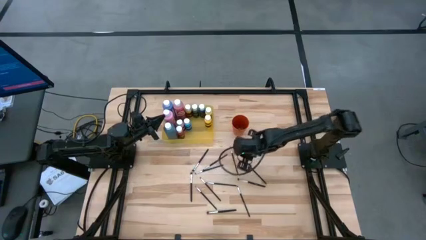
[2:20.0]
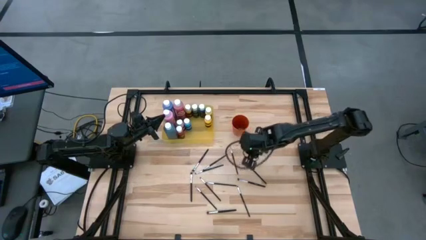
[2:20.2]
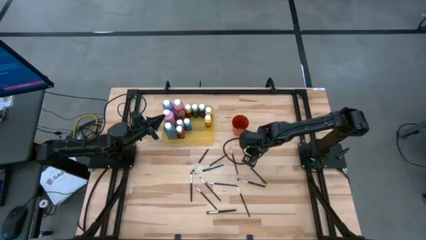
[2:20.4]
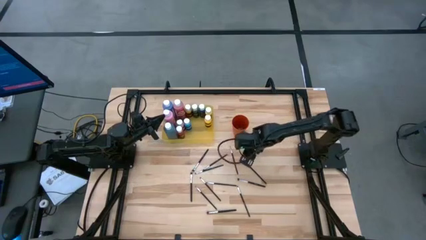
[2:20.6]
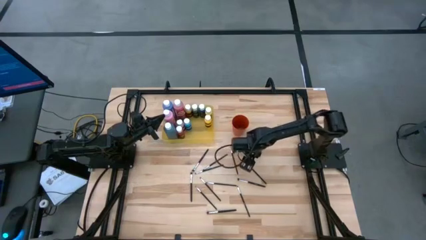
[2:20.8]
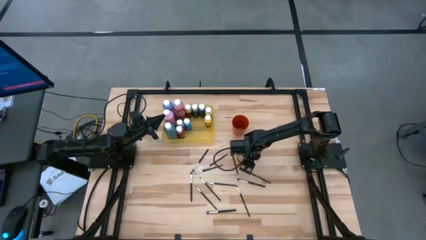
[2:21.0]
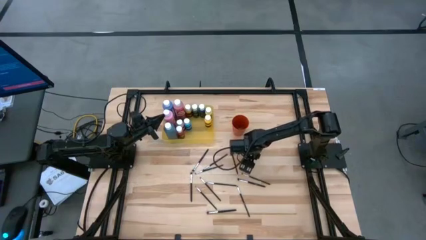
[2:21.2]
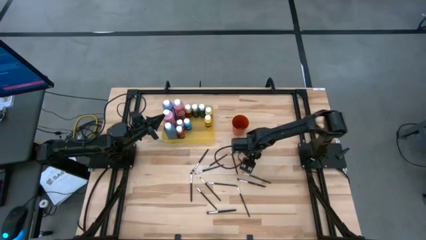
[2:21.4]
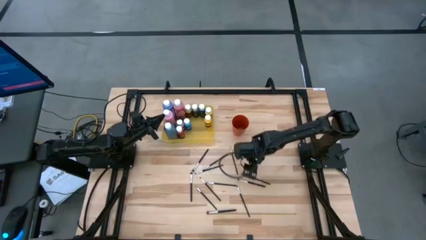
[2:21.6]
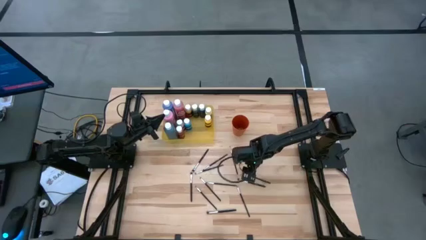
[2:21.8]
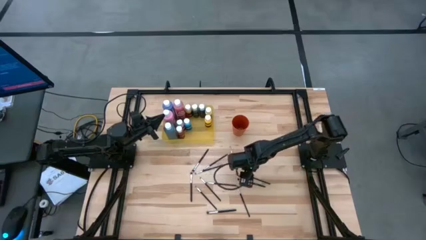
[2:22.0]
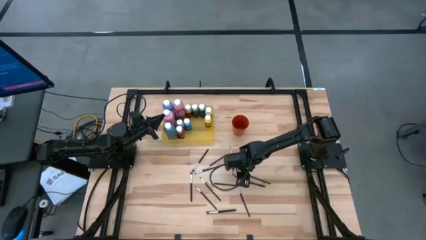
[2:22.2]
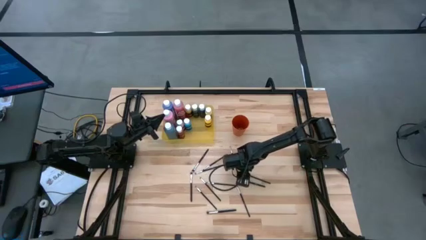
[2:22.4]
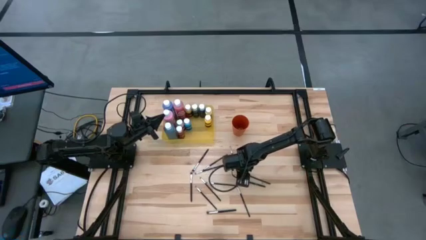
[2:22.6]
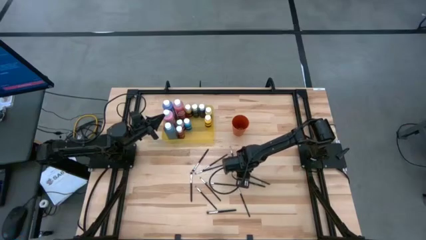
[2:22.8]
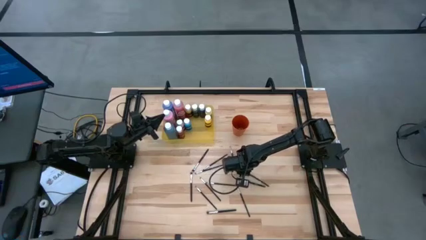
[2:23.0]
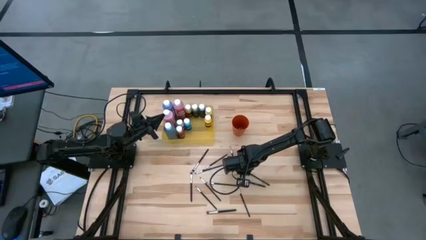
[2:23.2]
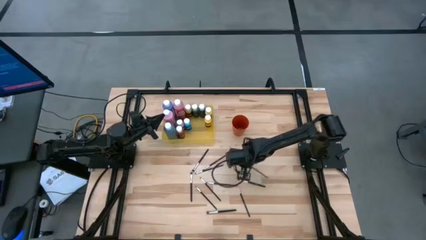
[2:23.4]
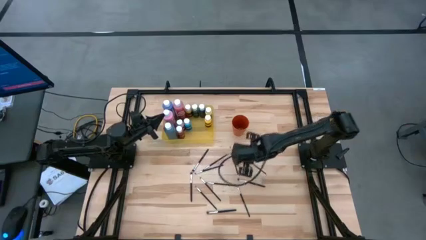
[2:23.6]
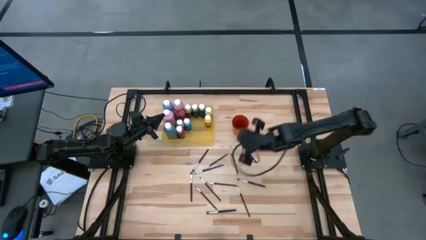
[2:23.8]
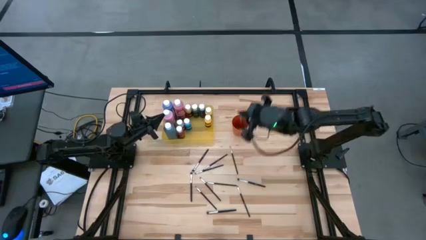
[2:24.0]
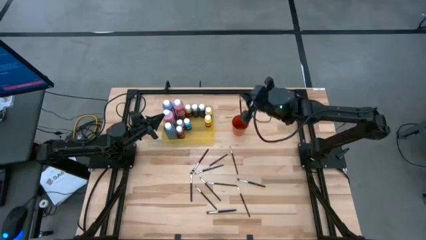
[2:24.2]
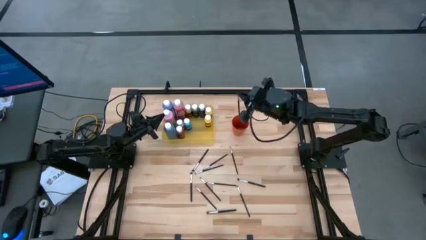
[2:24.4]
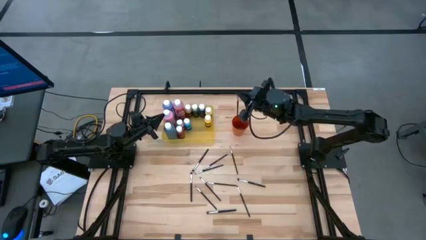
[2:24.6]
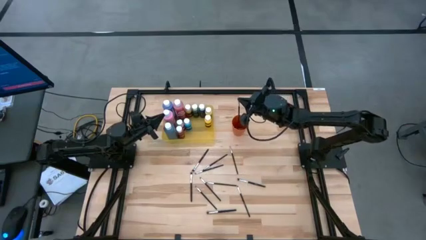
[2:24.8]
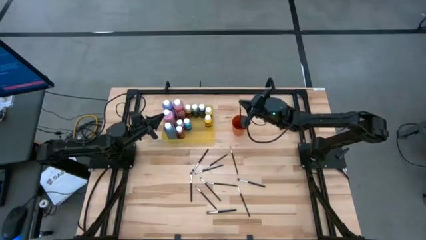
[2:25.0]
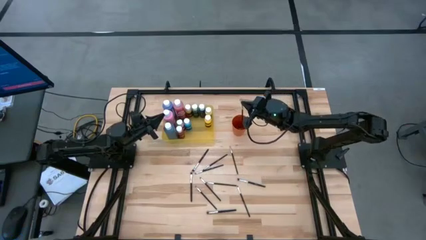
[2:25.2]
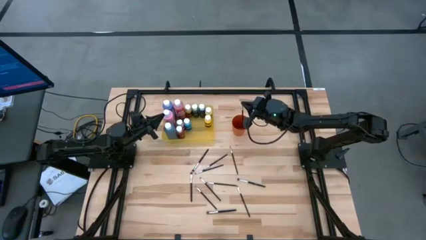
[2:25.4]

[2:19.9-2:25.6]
Task: Pick & Place Paint Supplies
Put the silver paint brush into the orange cup

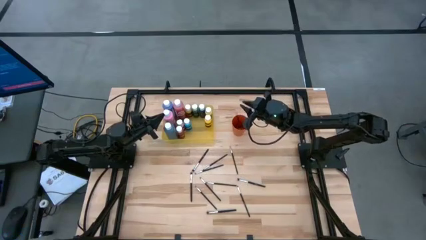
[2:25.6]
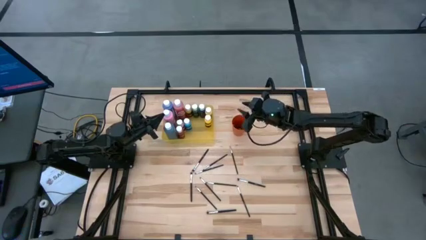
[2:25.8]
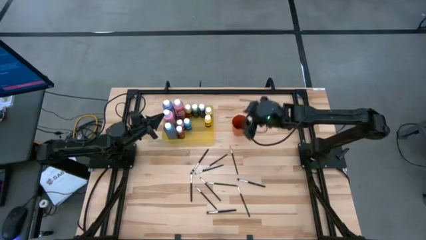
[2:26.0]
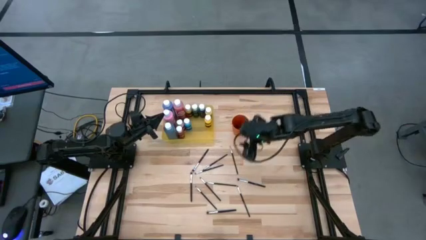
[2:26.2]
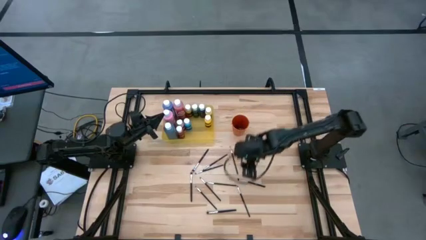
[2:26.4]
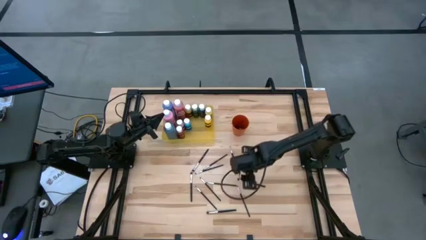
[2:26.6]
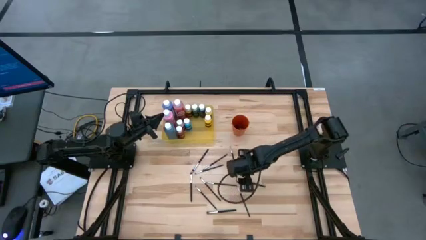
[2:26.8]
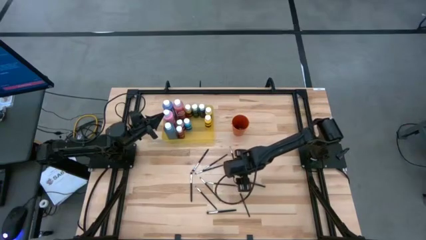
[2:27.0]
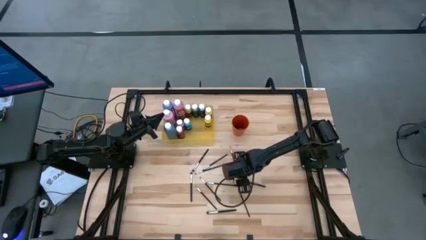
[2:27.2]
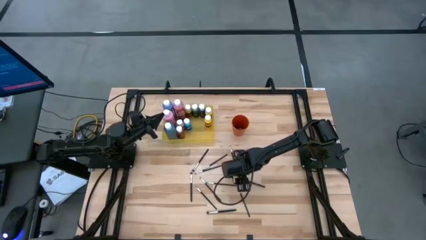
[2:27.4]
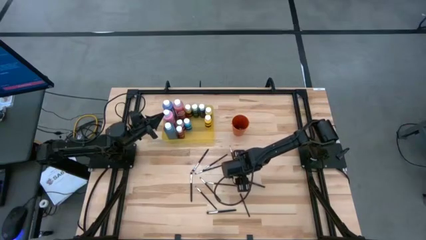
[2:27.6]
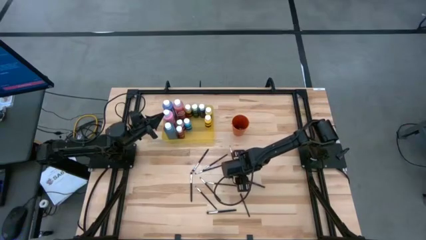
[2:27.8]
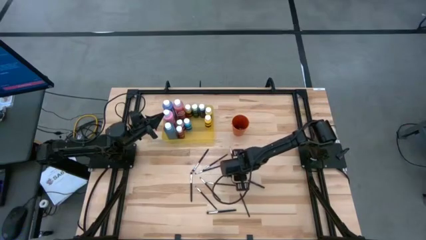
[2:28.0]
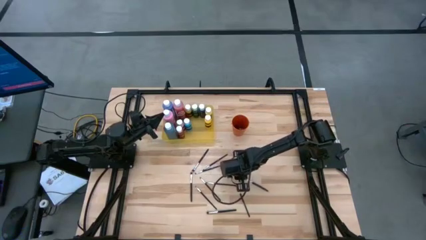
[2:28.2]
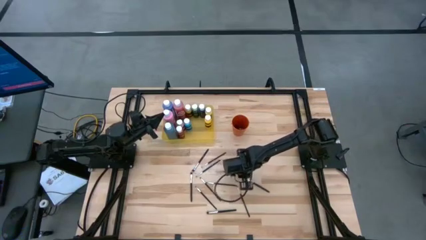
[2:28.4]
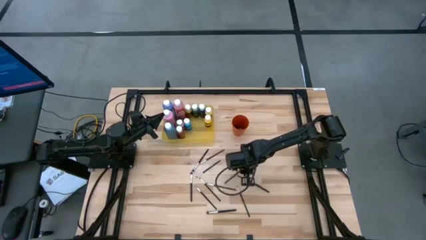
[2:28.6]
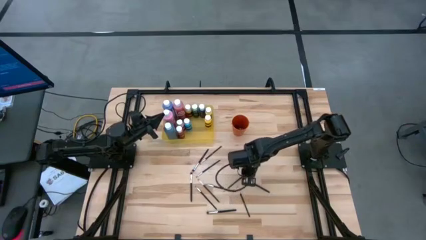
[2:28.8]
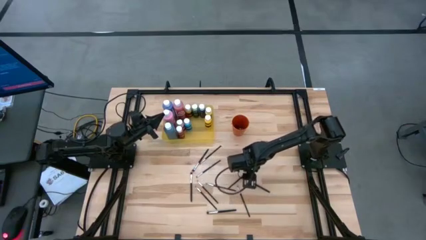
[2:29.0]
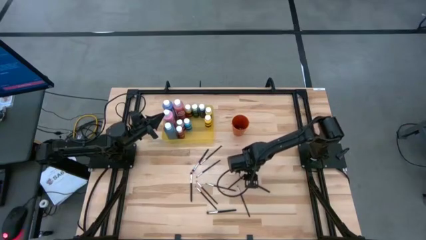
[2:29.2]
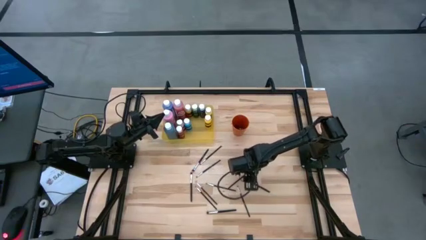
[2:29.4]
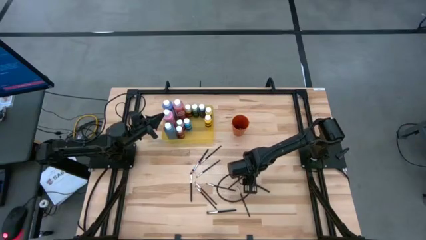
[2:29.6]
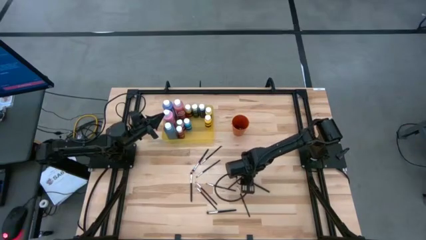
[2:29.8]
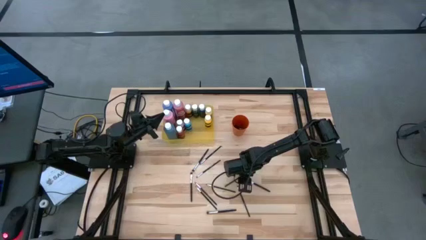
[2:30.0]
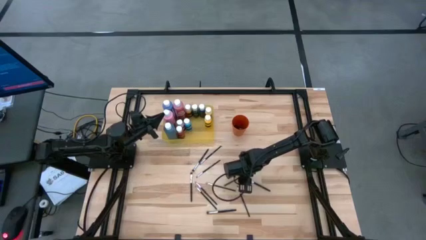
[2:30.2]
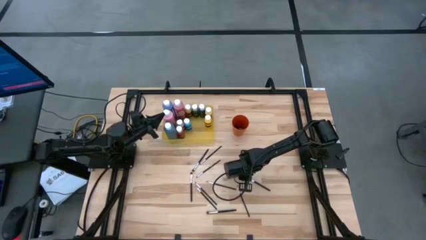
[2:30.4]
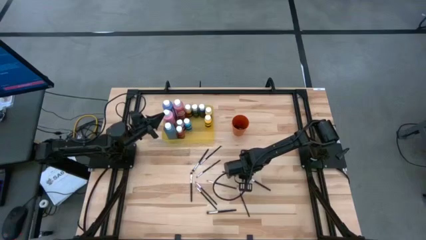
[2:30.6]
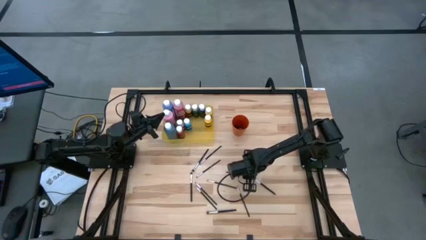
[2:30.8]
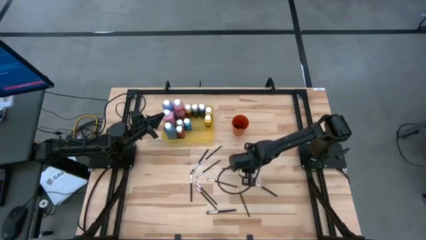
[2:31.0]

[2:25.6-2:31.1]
Put the silver paint brush into the cup

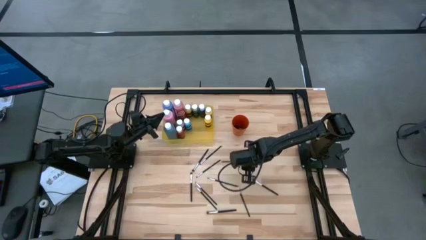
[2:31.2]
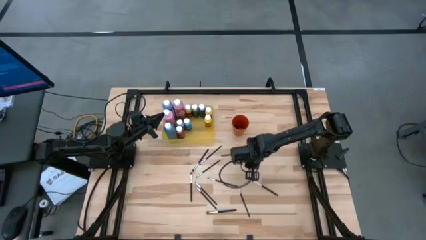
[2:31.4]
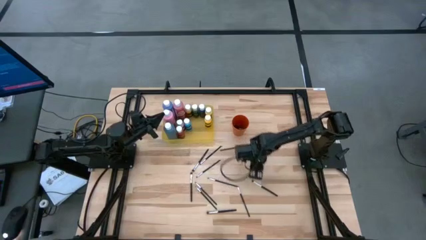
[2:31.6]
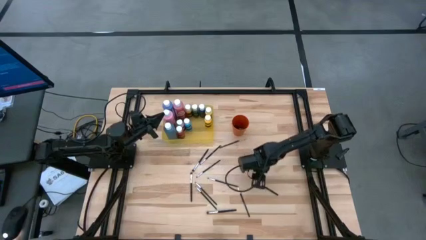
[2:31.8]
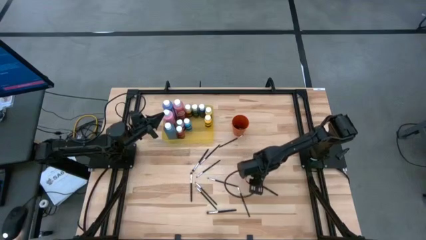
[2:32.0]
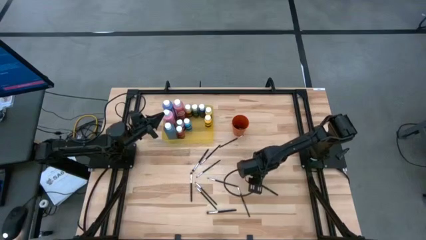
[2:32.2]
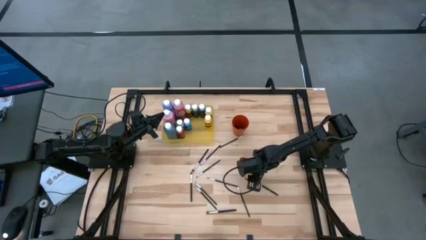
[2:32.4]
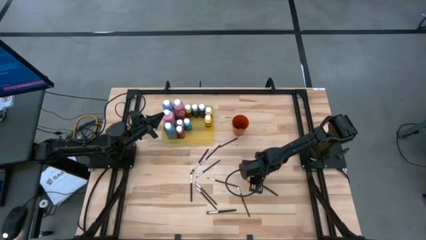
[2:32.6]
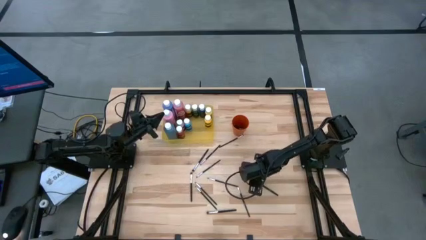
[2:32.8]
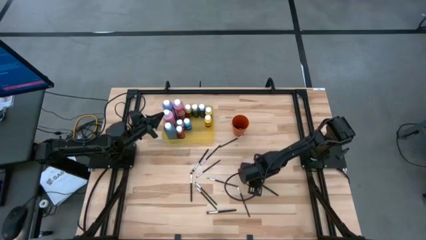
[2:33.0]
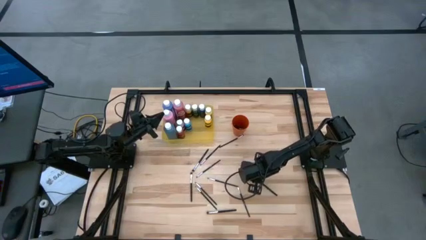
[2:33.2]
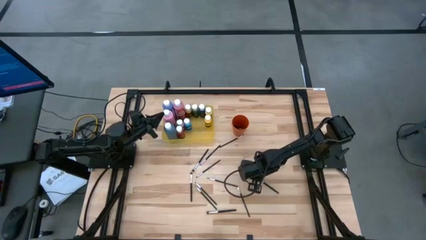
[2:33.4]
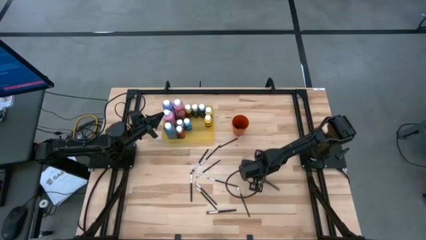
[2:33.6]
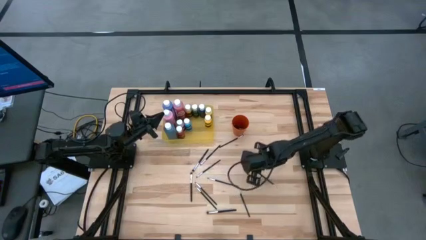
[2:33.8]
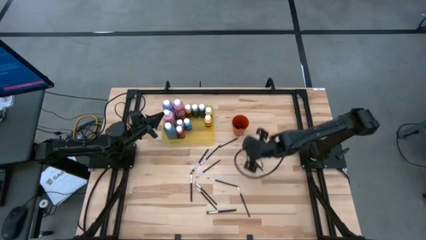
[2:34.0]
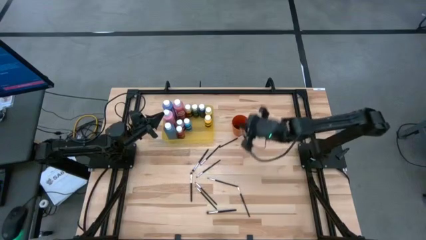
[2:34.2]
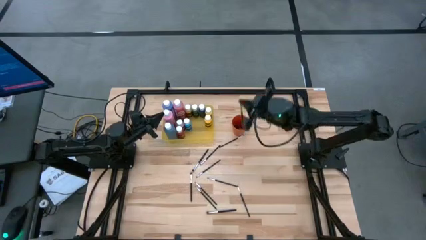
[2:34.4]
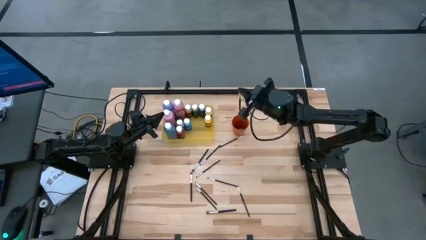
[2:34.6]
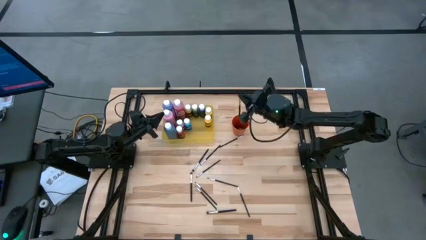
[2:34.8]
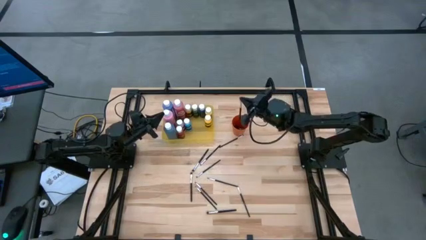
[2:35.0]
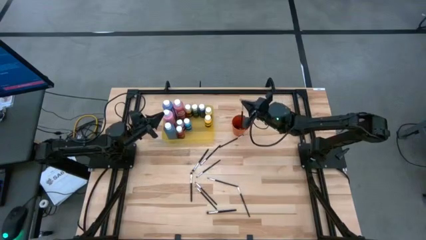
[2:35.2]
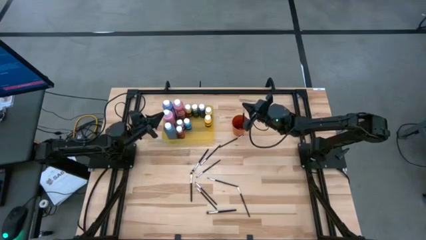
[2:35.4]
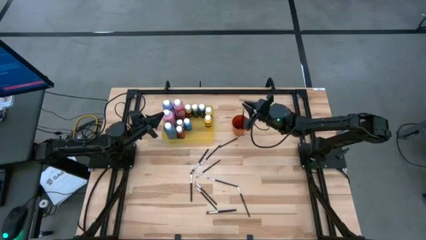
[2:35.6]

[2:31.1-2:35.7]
Put the silver paint brush into the cup

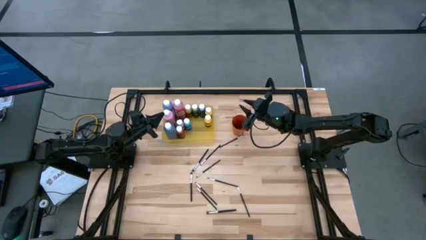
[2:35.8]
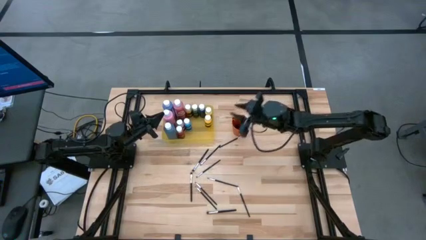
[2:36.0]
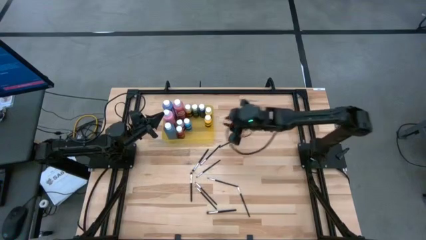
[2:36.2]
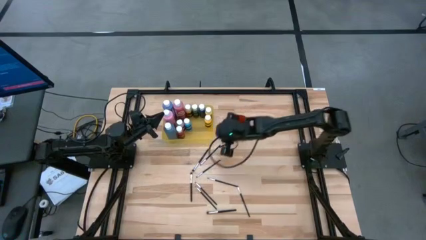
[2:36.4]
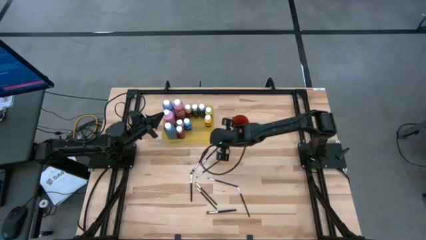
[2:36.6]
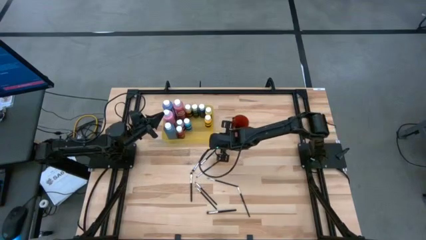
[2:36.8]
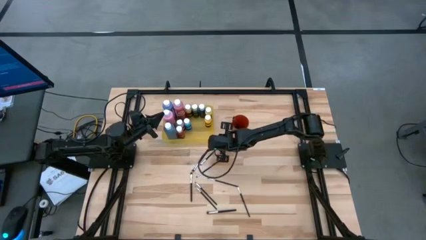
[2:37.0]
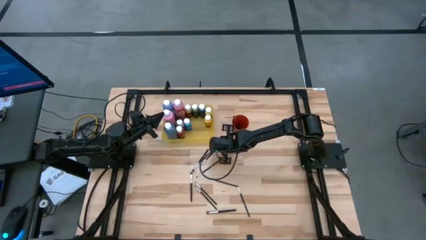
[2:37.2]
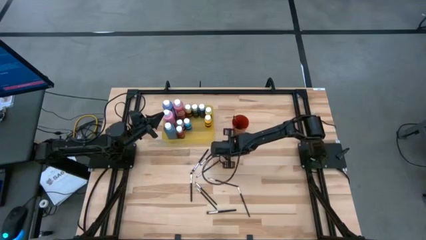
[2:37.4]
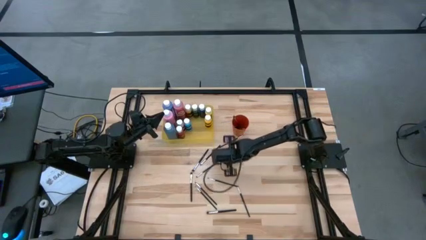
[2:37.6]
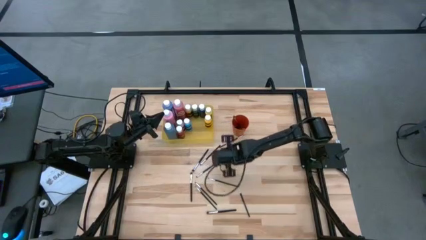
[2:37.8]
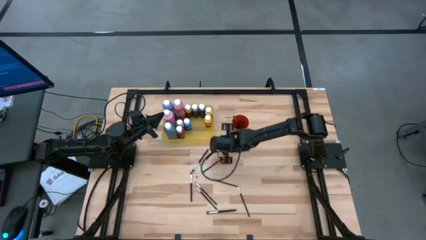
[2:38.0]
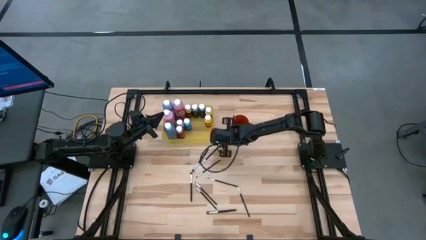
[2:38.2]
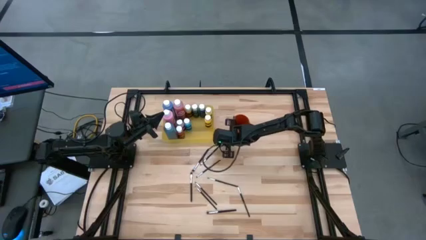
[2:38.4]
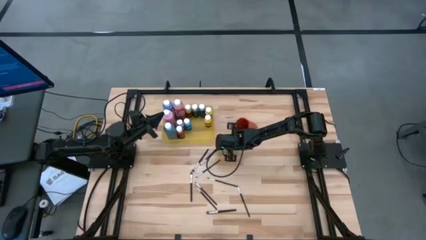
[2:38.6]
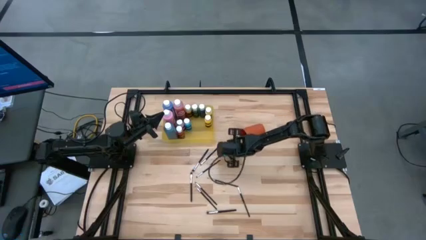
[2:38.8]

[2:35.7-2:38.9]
Adjust the silver paint brush on the table
